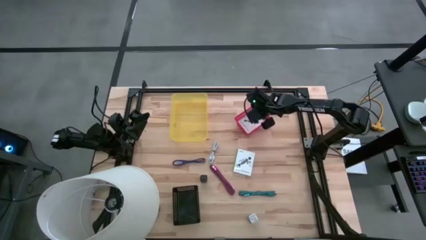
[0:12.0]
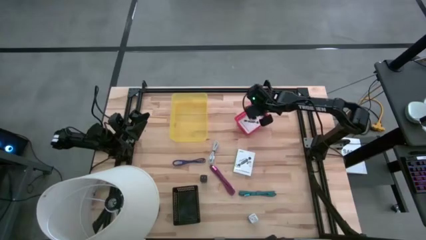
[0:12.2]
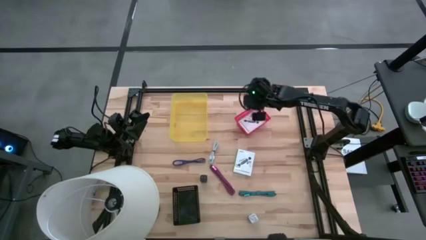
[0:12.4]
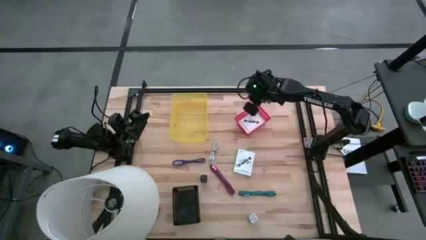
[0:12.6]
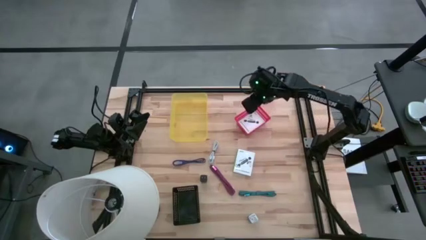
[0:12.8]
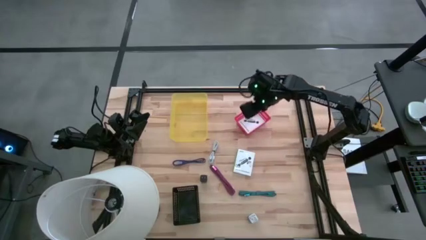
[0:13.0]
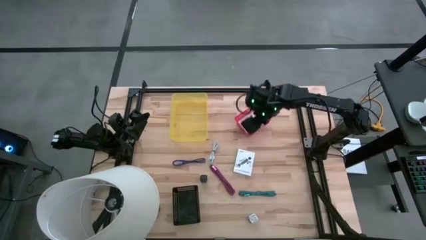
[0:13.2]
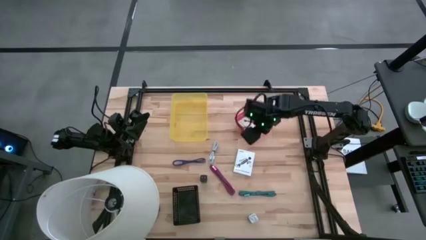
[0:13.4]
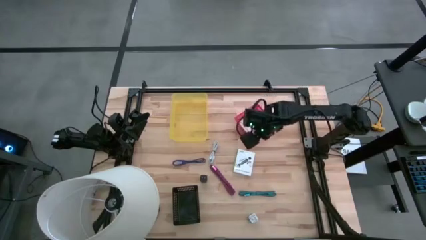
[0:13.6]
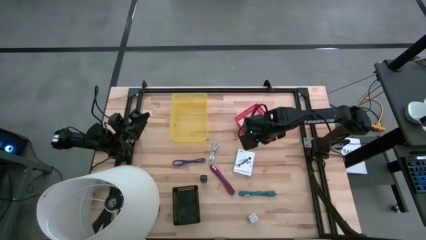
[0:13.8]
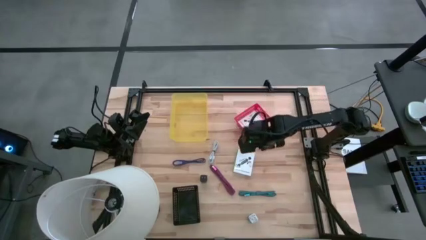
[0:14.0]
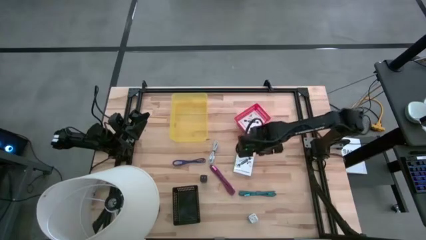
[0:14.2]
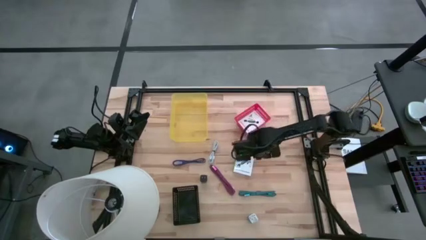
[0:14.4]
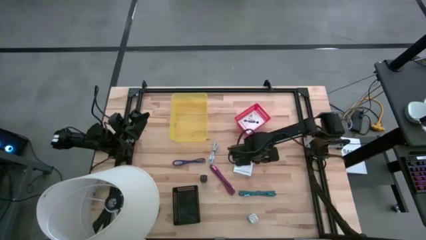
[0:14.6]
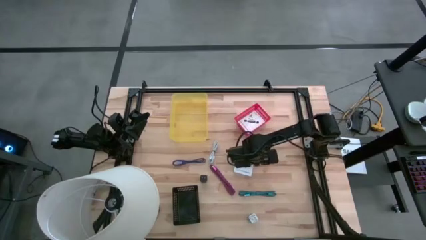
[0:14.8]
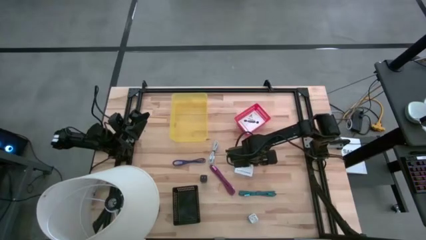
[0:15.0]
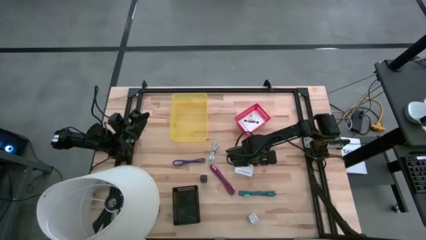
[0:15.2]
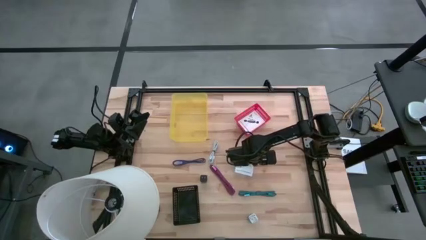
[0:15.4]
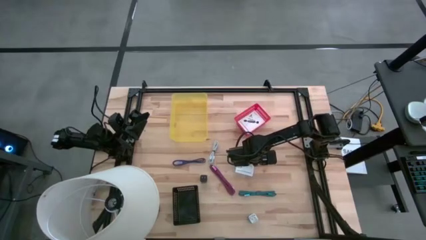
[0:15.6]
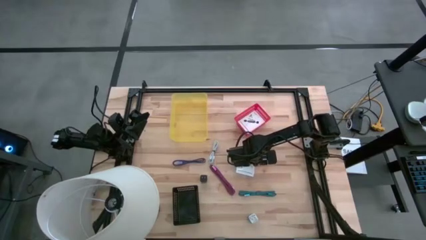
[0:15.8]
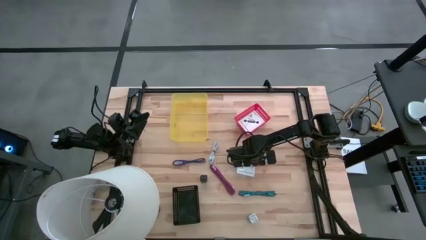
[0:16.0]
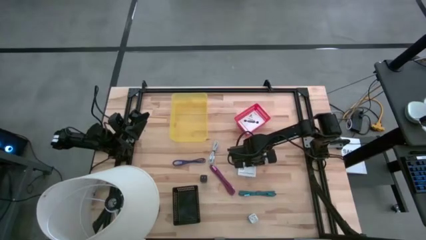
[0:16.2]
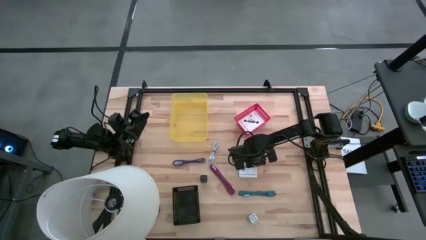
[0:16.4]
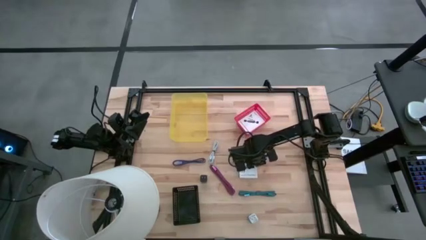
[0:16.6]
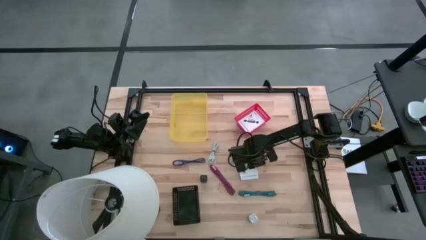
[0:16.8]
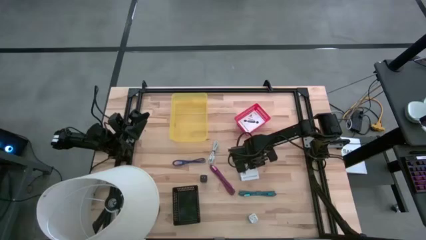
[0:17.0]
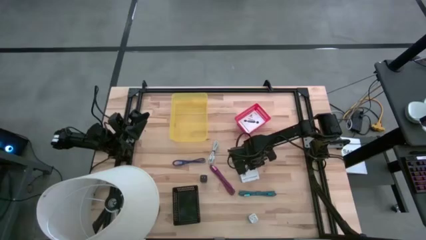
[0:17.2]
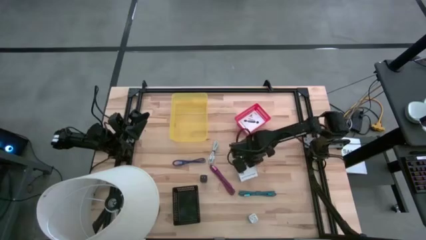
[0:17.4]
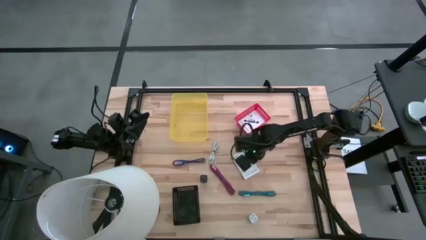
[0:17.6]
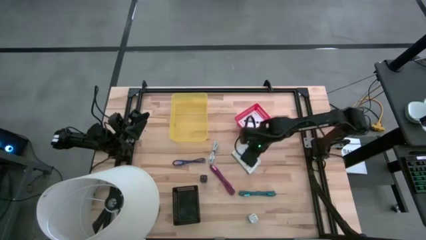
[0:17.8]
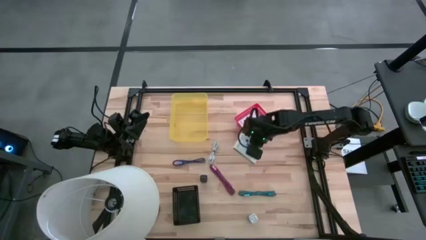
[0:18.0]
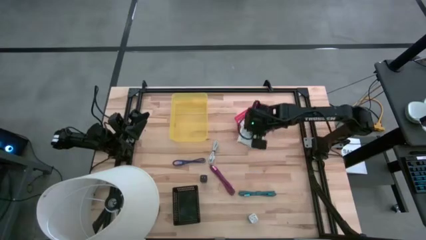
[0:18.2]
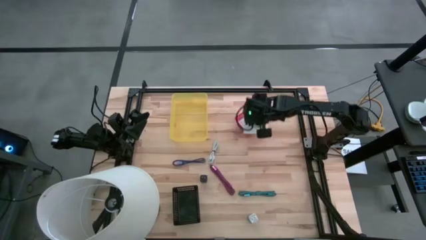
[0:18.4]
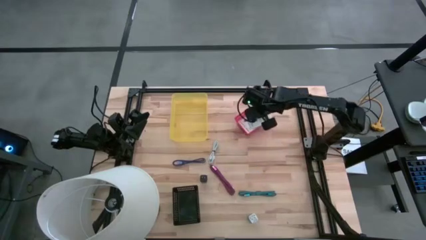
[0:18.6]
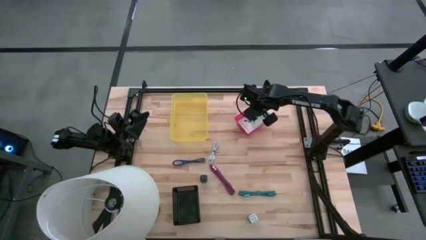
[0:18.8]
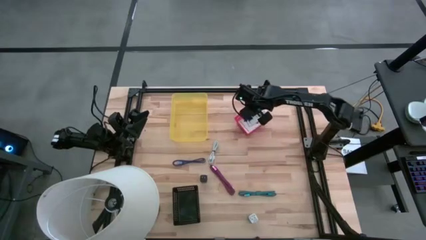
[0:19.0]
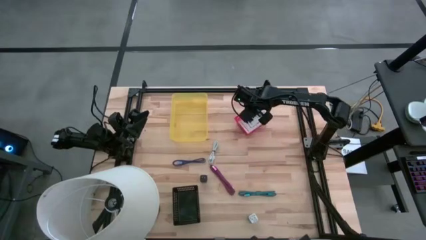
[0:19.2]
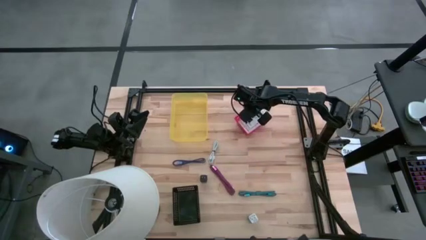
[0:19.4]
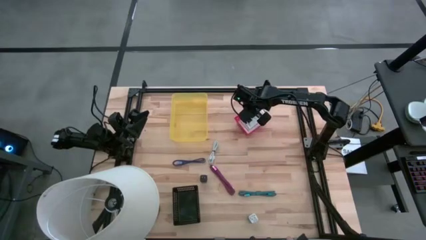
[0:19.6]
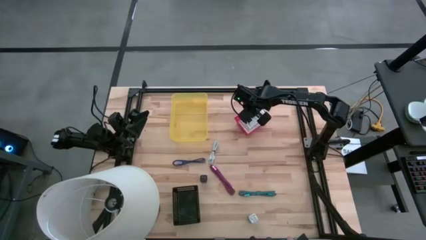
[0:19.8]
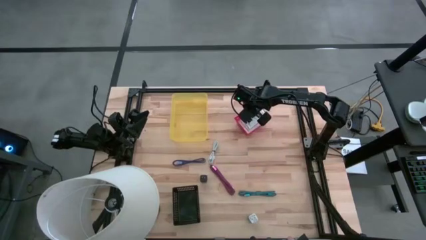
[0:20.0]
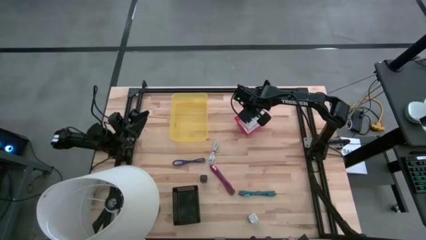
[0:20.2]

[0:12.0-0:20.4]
Task: Pick and place items into bin
Put the white box into the red bin

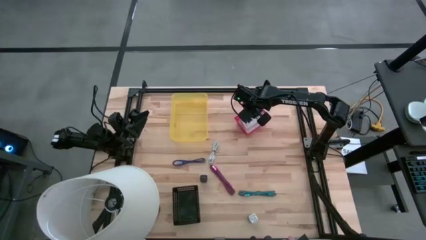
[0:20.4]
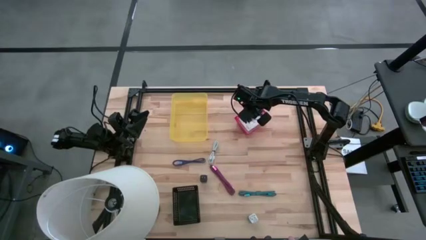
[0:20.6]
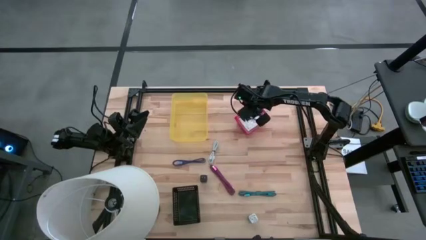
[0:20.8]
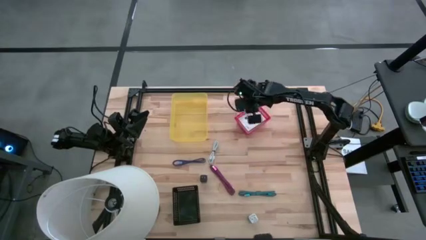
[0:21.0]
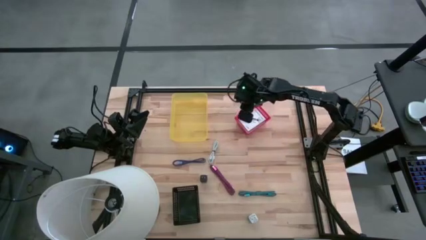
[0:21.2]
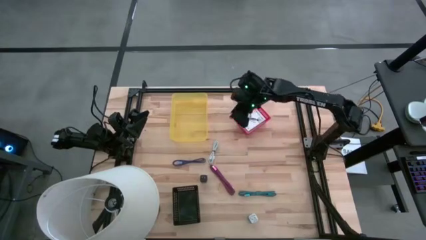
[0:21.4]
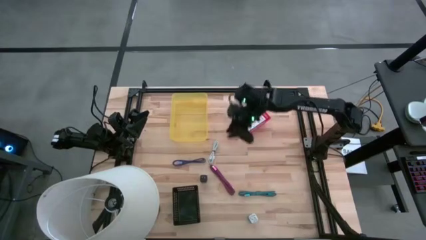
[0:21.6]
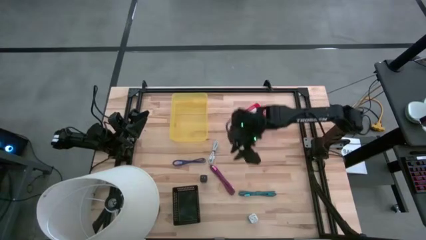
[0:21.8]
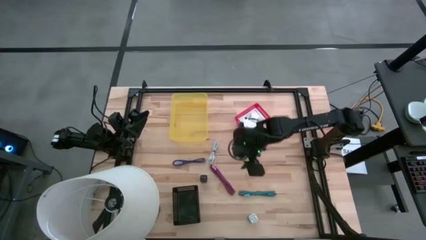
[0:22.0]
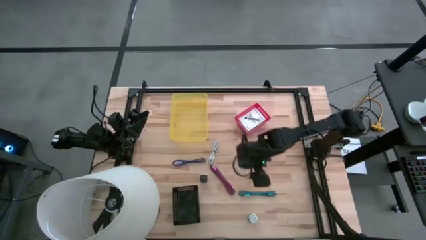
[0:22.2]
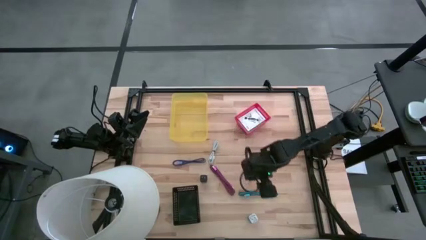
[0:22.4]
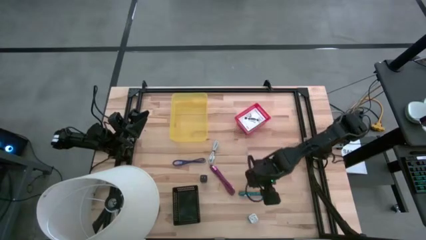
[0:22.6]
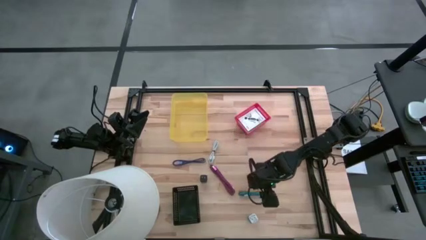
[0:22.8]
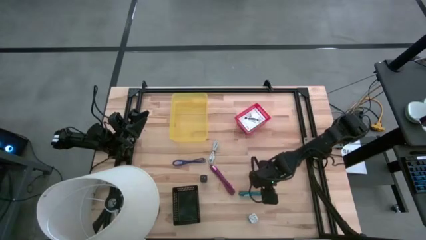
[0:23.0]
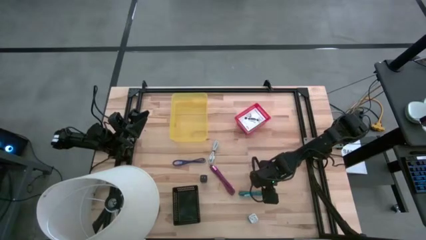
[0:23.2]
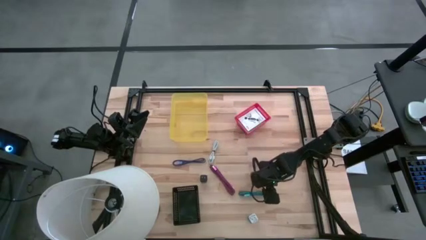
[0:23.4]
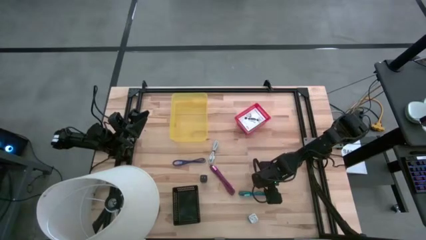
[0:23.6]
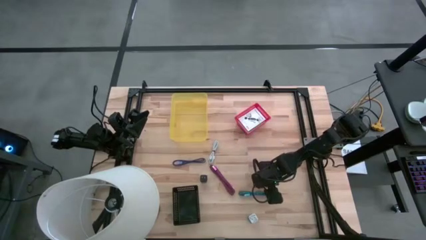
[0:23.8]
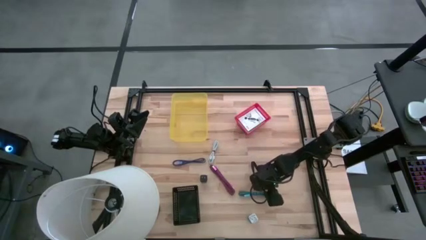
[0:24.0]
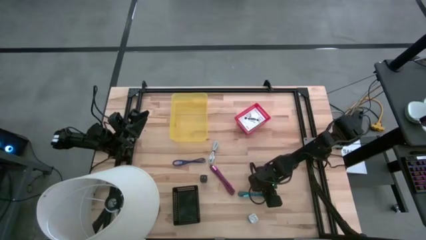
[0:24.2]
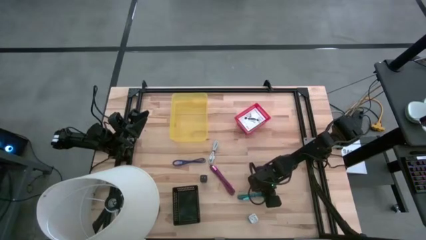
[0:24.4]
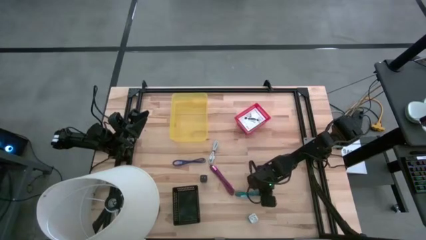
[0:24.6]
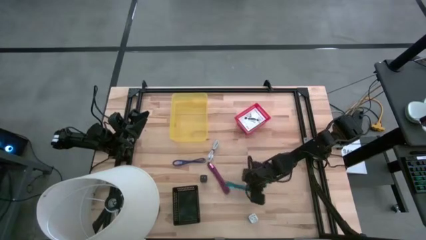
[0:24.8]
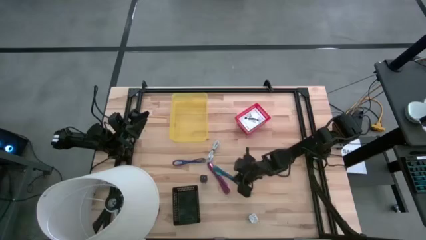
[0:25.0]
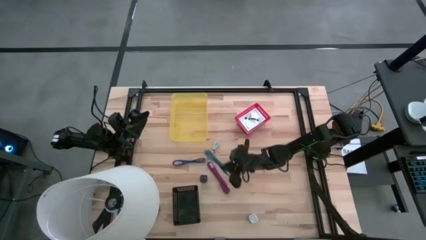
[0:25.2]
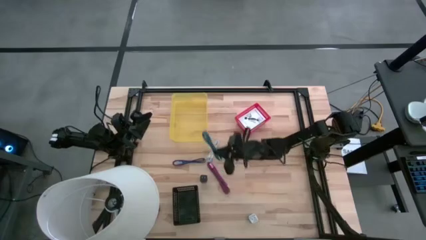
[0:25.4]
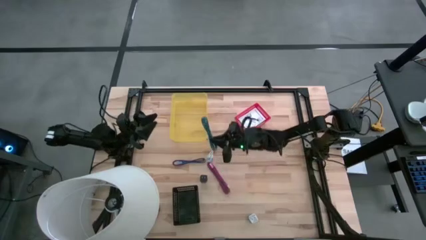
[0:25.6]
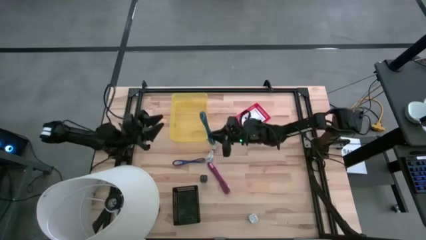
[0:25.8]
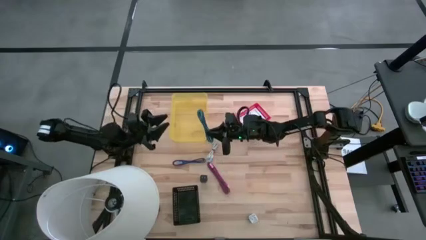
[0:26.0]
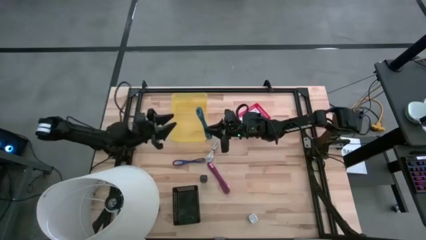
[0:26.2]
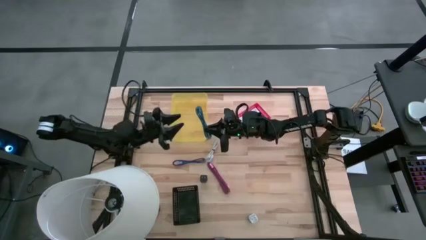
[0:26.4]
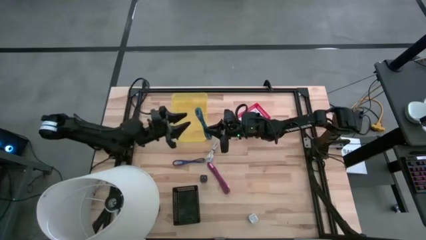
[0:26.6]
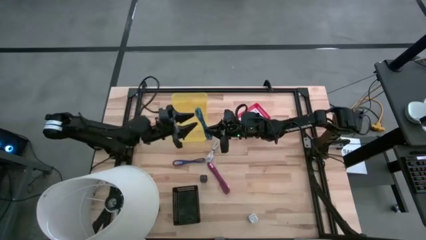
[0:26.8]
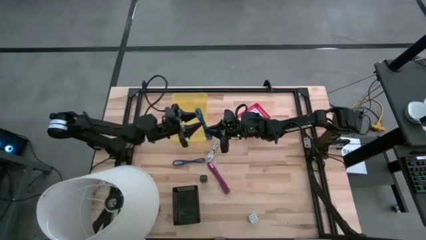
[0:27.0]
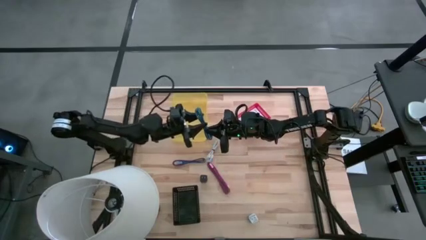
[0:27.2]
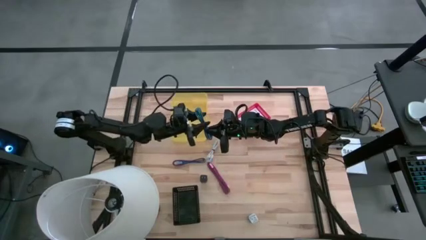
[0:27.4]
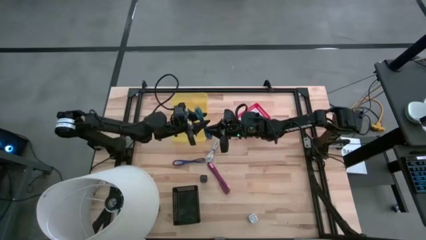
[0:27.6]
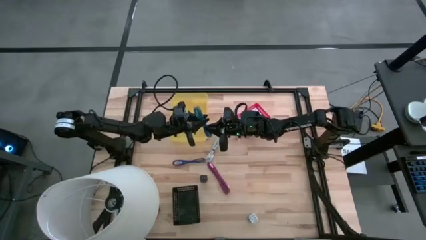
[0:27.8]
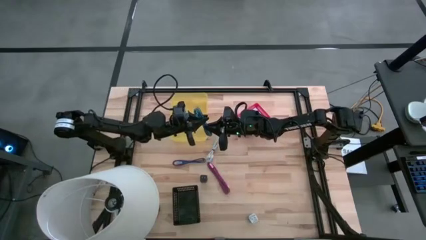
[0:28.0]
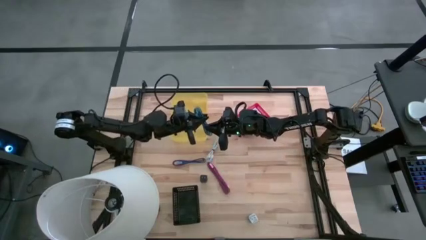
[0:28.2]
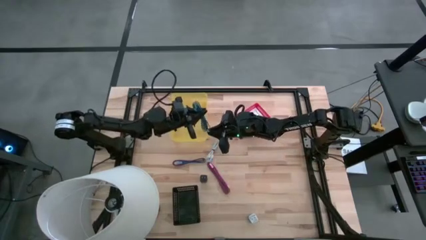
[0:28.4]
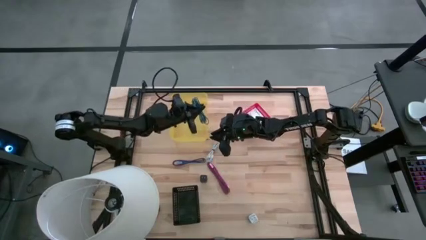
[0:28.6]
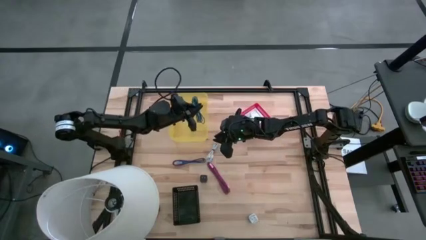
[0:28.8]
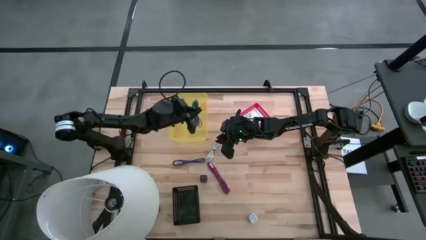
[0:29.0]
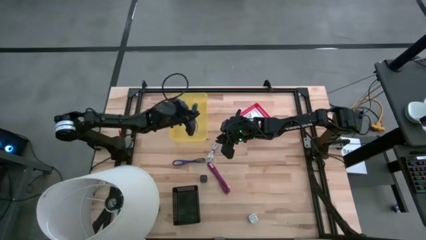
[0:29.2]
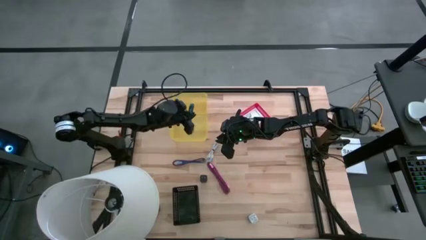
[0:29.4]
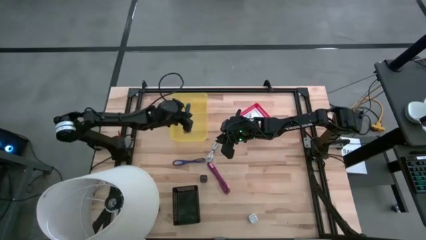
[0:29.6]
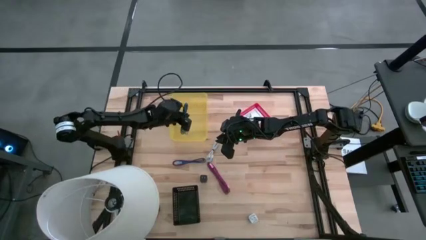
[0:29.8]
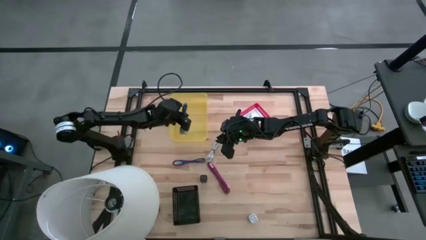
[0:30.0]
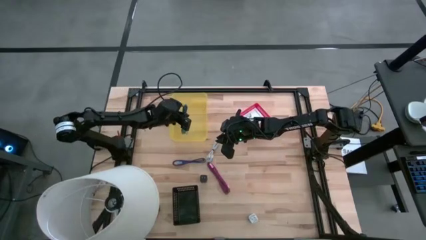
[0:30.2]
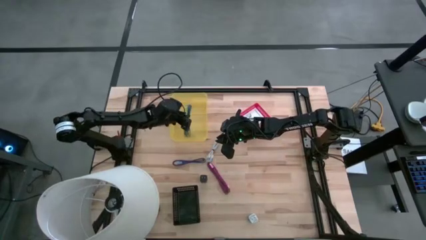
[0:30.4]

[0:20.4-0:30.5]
Put the light blue charger cable into the yellow bin
